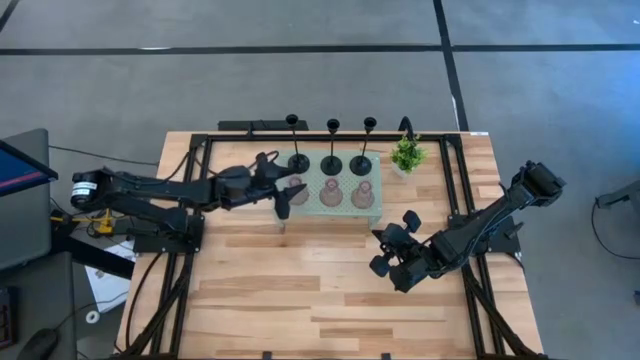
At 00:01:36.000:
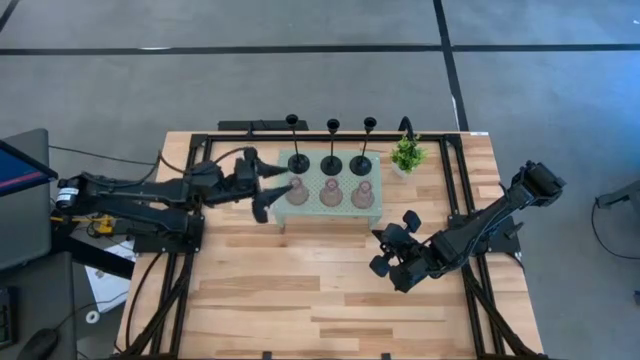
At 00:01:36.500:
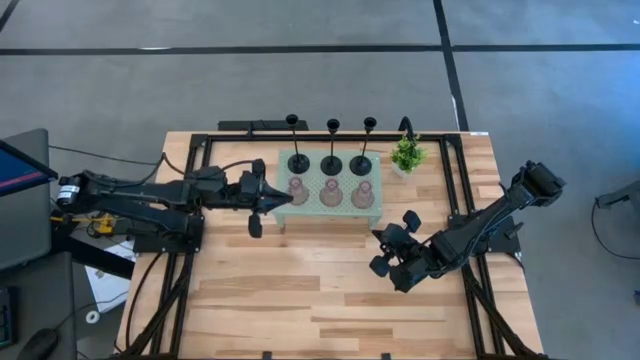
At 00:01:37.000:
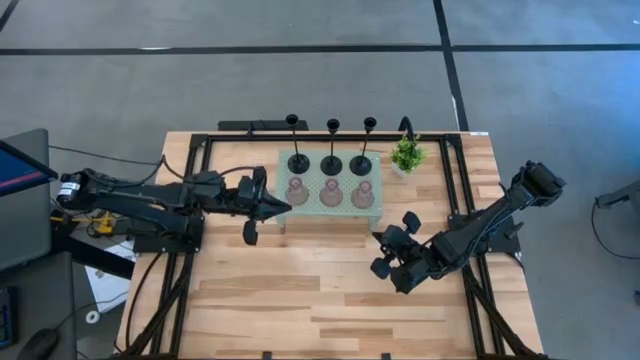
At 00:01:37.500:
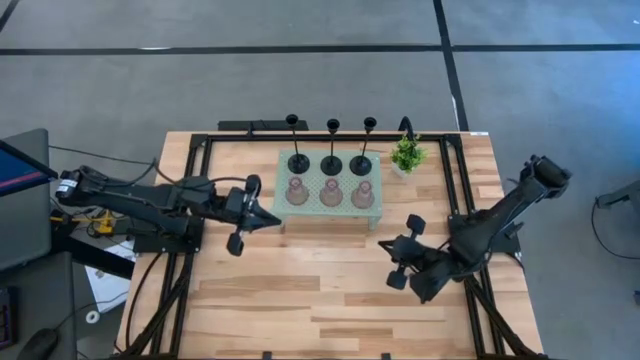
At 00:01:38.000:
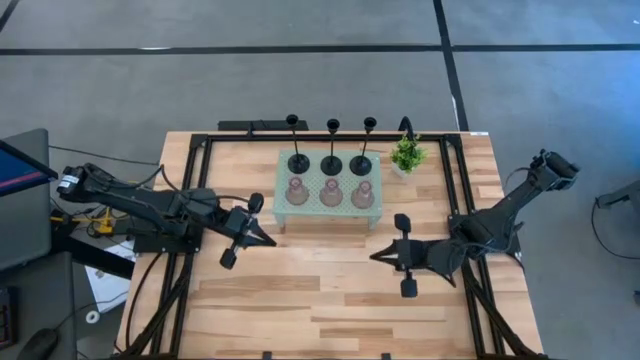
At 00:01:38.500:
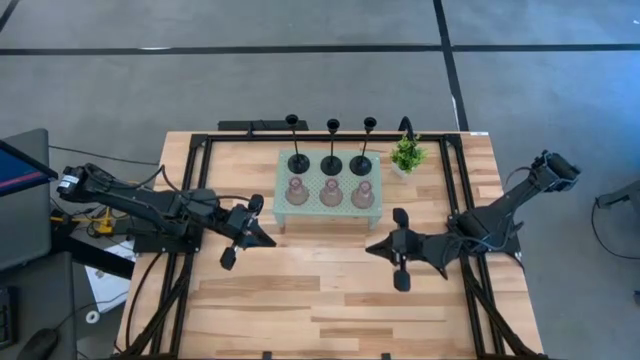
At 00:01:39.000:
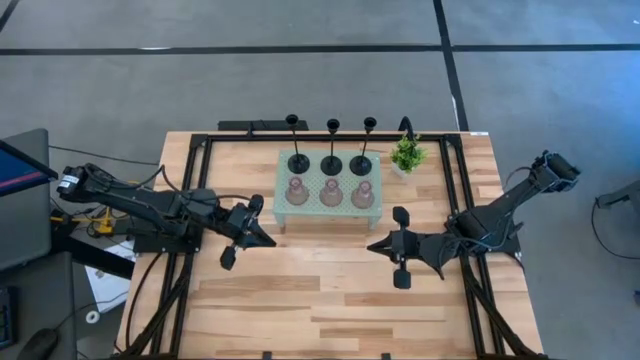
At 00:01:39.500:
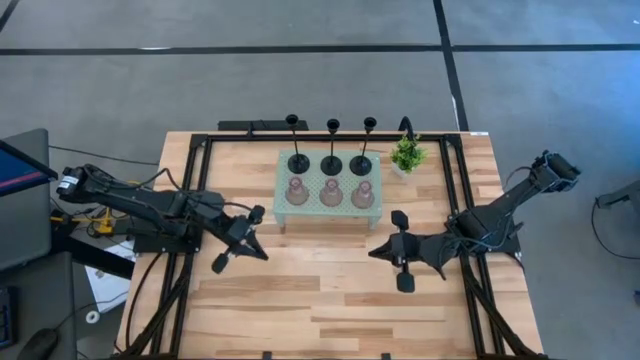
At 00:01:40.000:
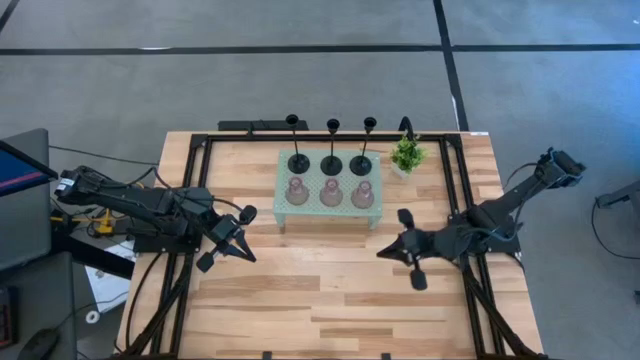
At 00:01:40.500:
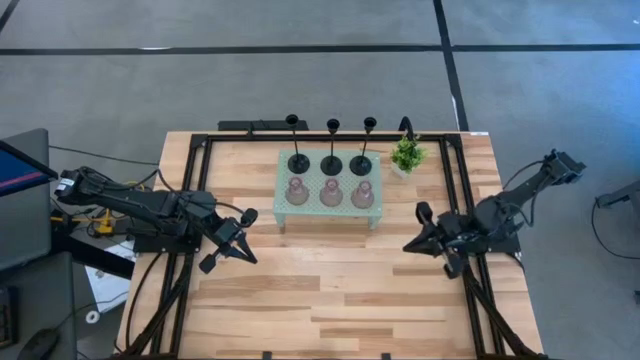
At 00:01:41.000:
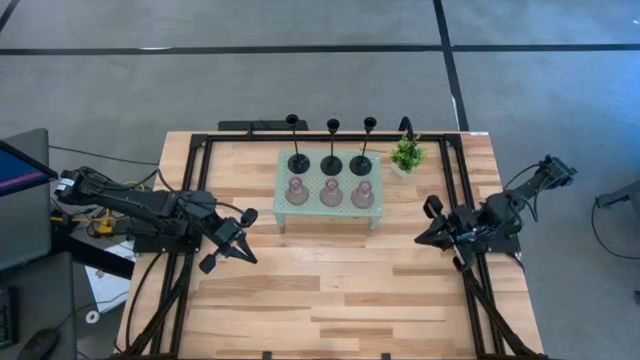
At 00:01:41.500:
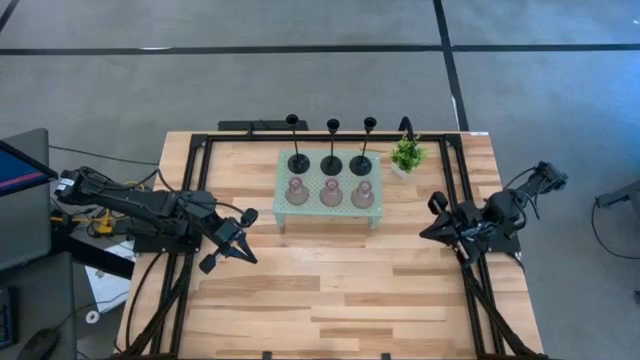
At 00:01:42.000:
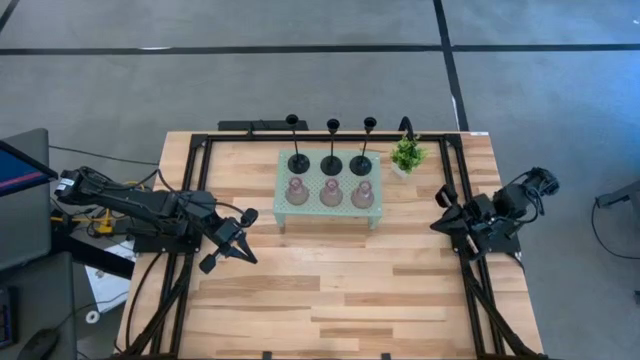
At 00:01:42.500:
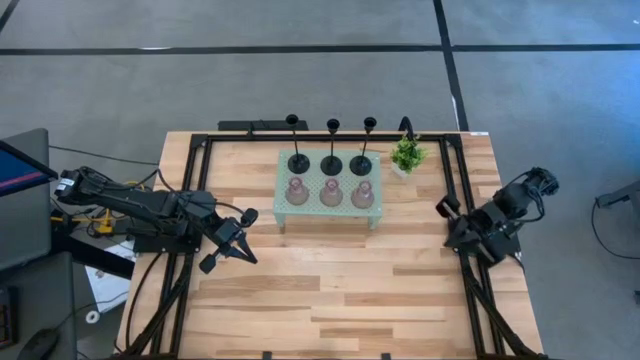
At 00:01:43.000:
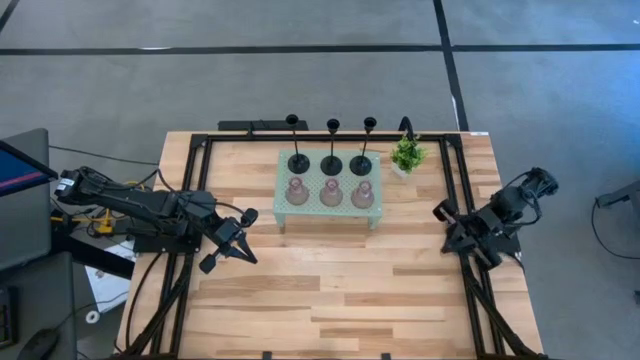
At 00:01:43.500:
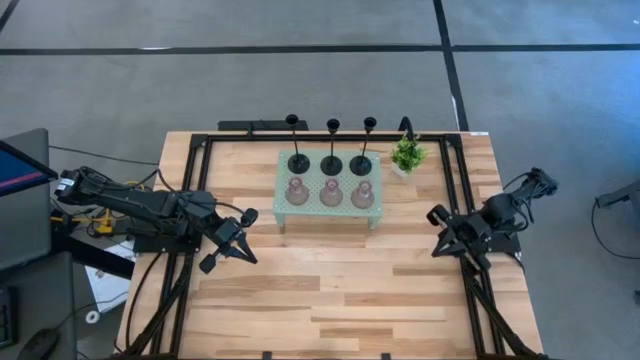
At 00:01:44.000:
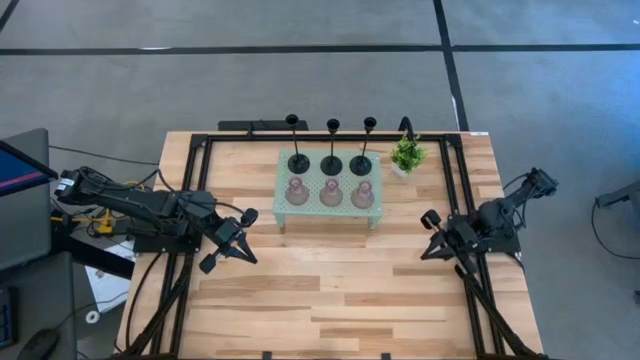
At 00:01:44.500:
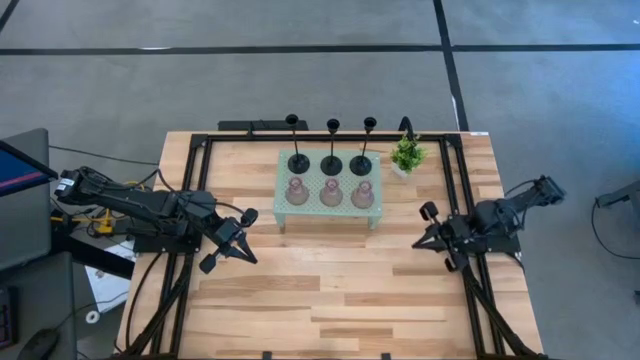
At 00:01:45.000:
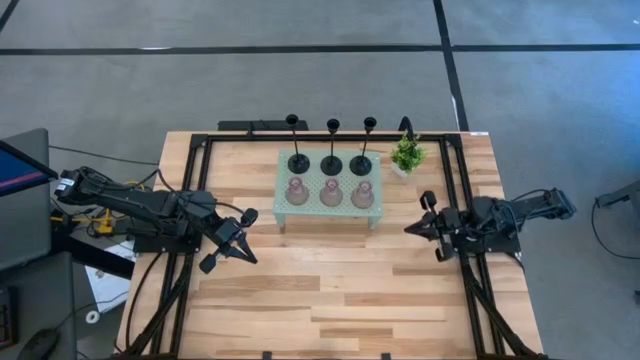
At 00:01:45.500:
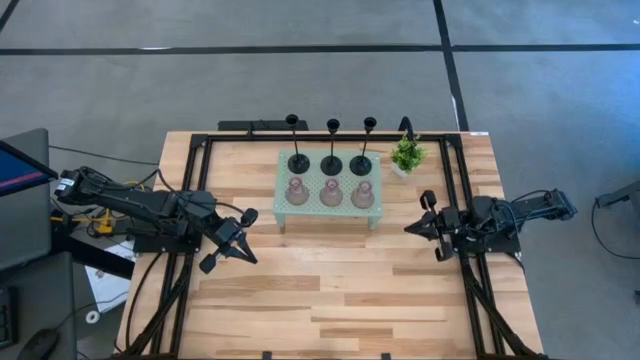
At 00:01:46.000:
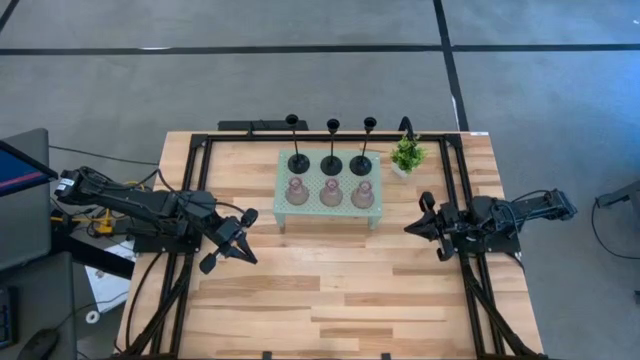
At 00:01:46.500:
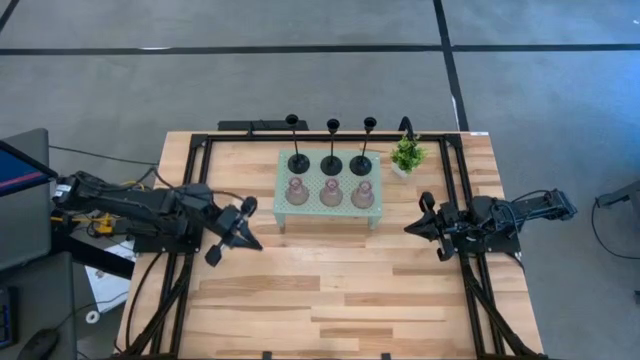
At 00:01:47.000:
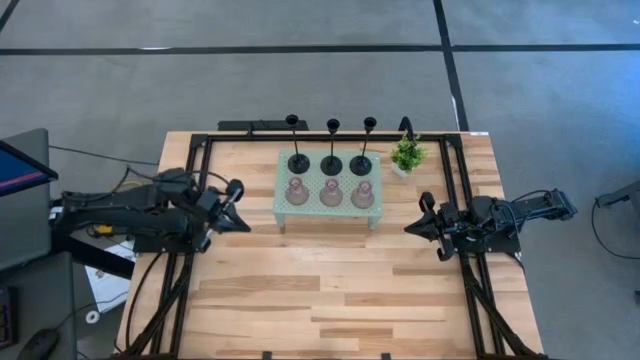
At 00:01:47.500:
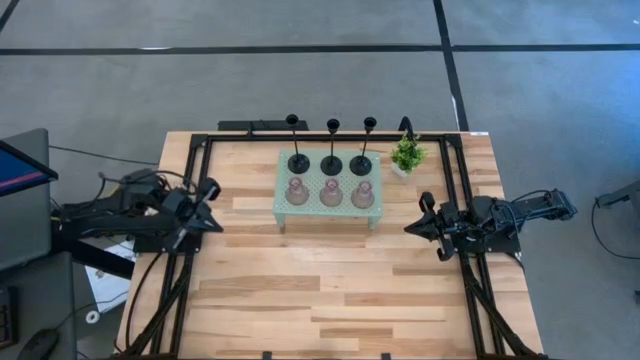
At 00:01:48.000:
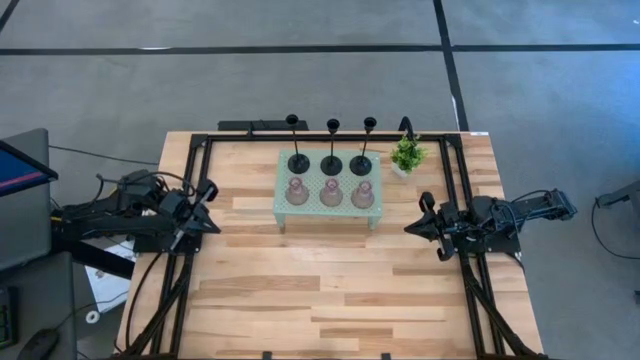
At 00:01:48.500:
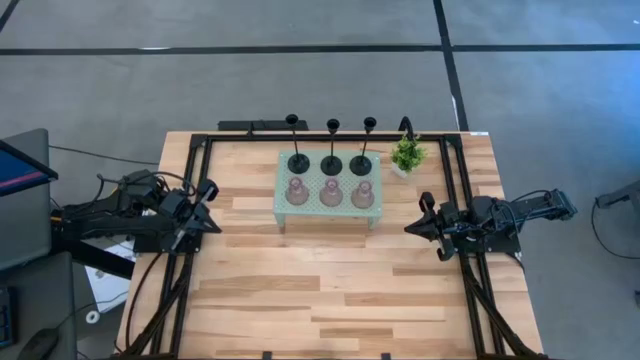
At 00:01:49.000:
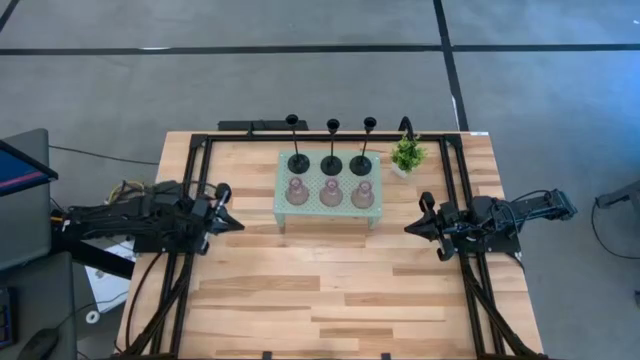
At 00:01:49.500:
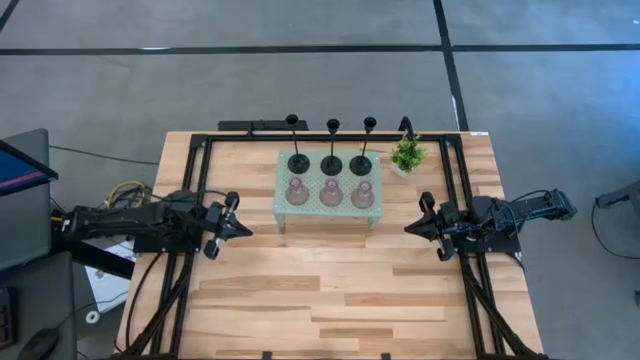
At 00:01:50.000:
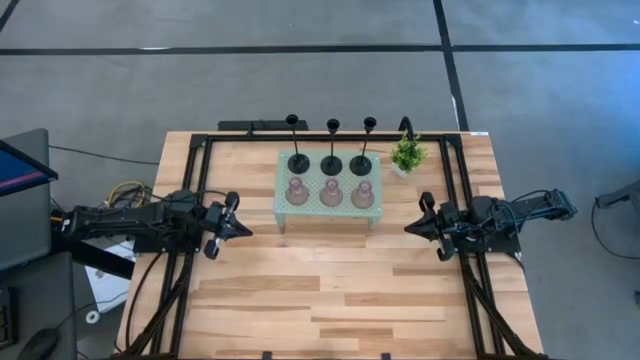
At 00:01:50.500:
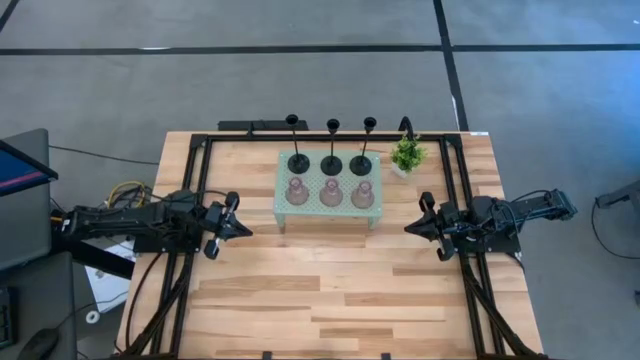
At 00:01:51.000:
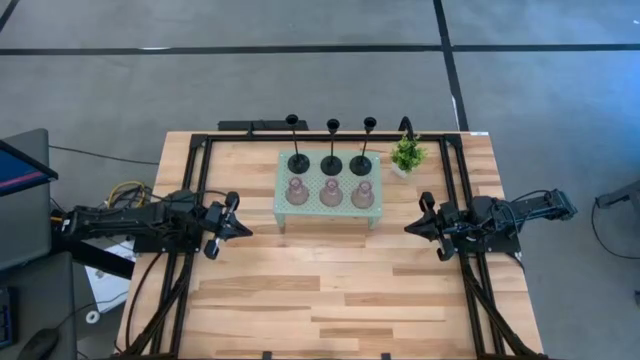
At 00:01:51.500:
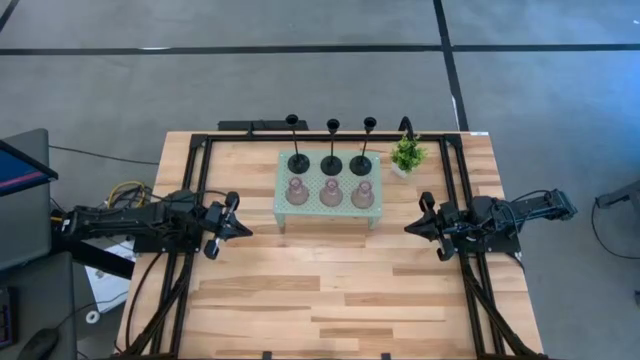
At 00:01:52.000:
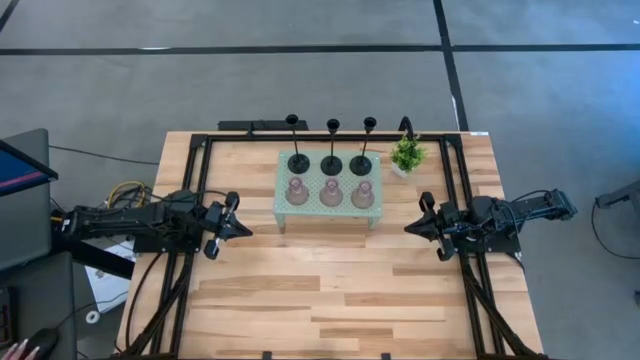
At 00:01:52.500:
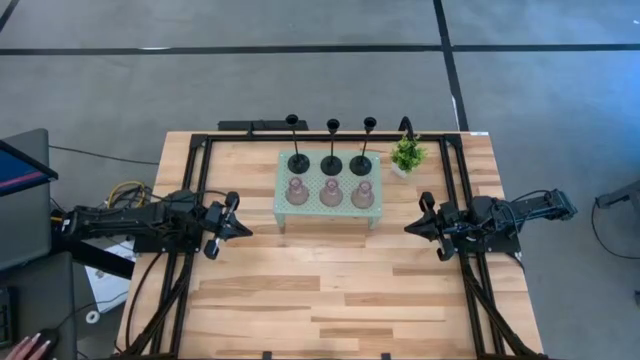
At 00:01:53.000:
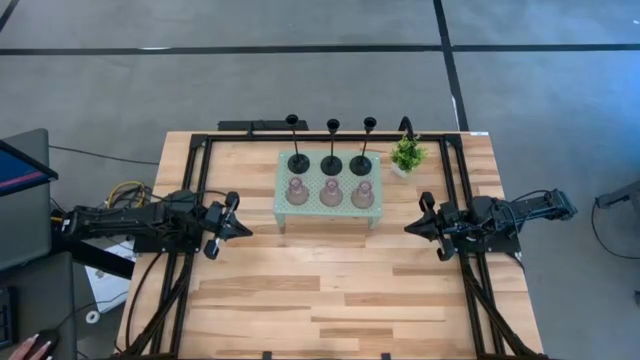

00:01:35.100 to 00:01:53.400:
Task: Pick & Place candle stick holders
Return to Home Position
